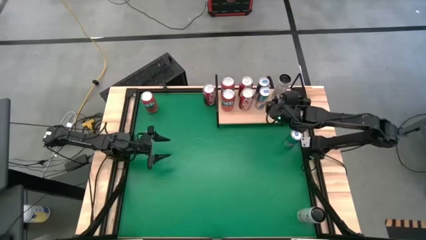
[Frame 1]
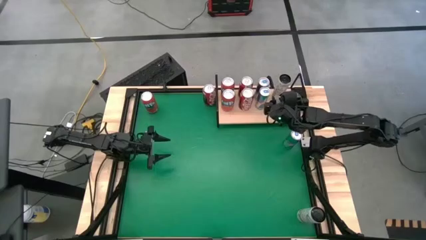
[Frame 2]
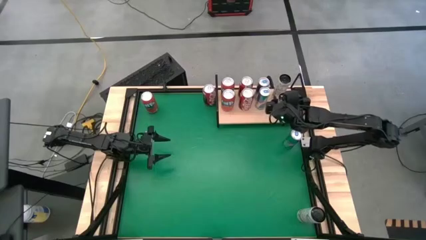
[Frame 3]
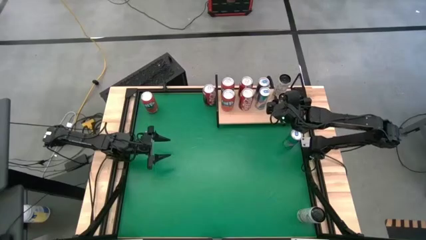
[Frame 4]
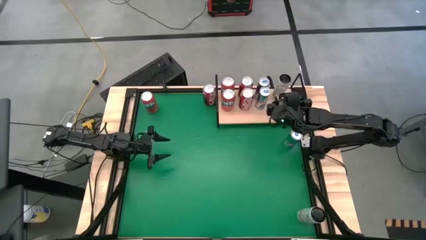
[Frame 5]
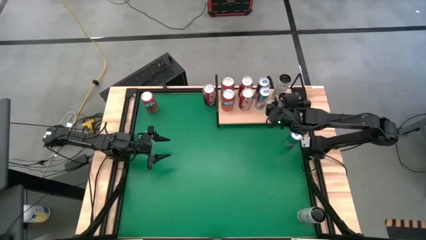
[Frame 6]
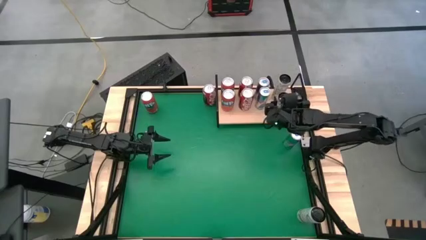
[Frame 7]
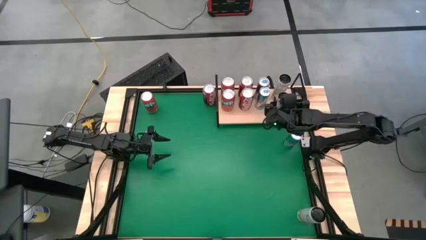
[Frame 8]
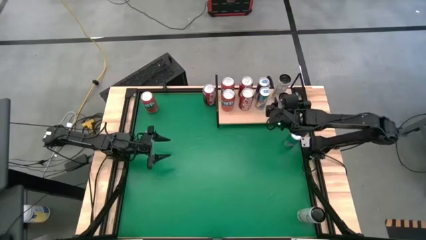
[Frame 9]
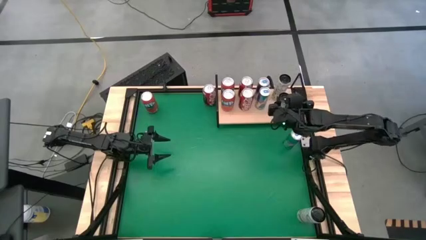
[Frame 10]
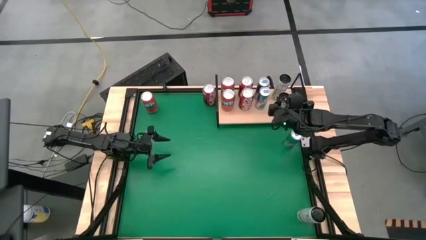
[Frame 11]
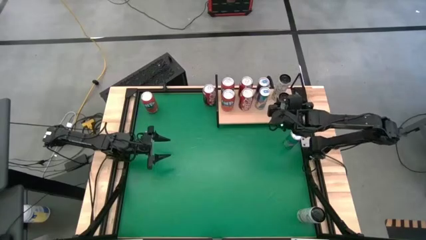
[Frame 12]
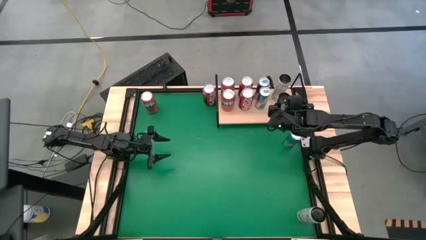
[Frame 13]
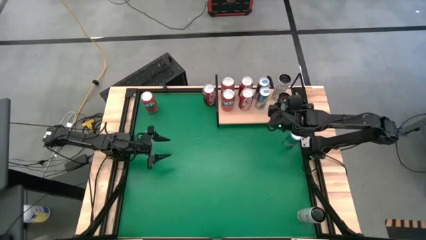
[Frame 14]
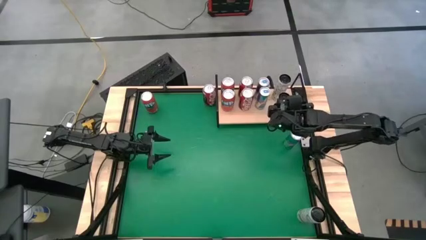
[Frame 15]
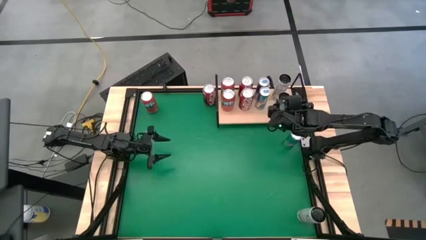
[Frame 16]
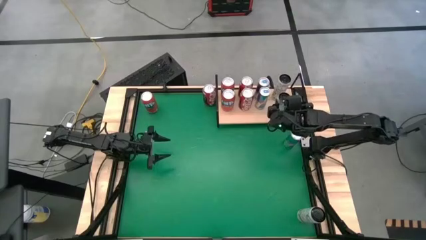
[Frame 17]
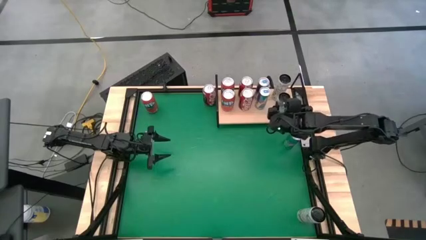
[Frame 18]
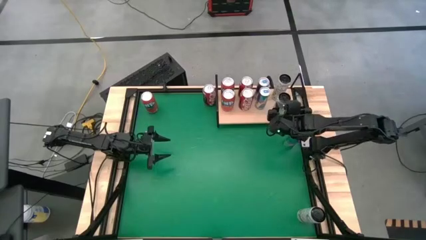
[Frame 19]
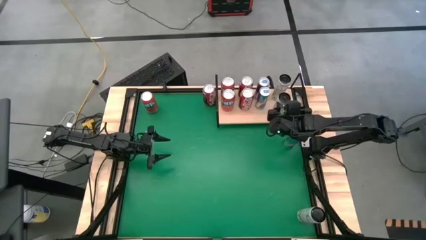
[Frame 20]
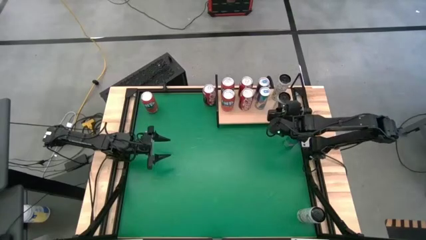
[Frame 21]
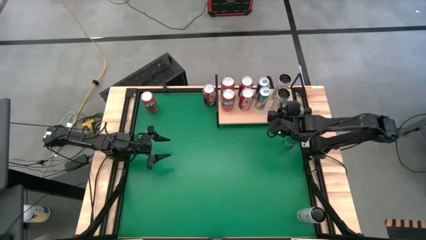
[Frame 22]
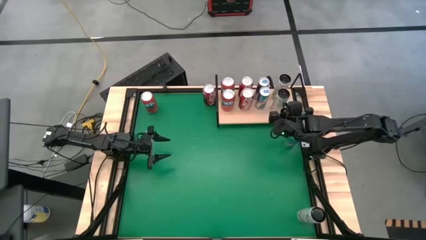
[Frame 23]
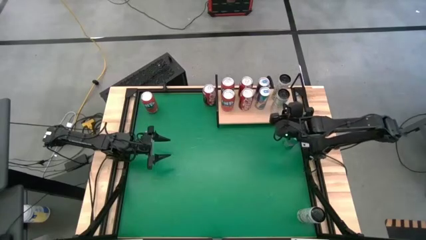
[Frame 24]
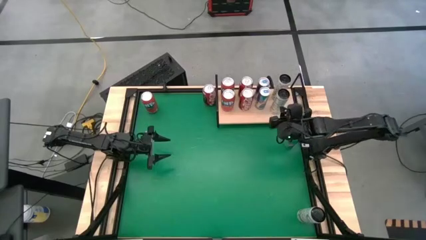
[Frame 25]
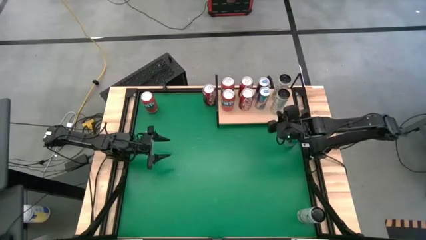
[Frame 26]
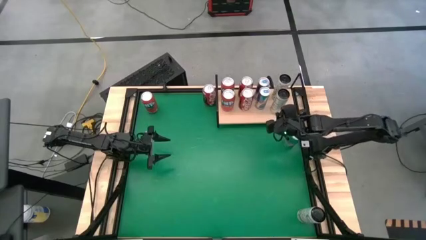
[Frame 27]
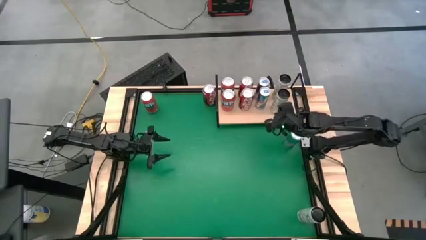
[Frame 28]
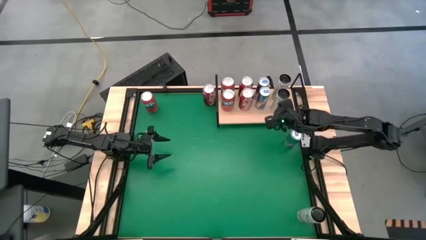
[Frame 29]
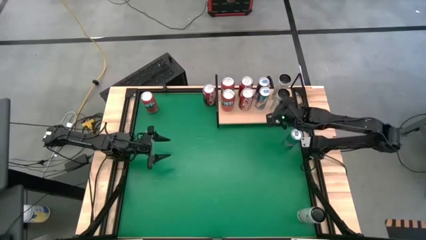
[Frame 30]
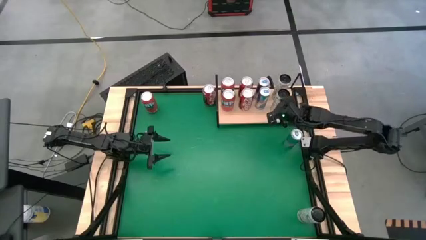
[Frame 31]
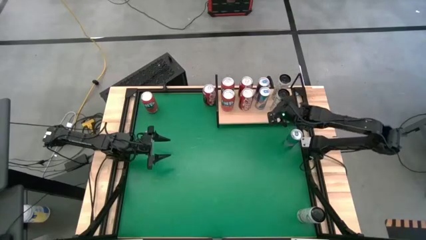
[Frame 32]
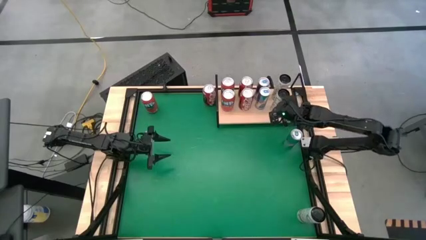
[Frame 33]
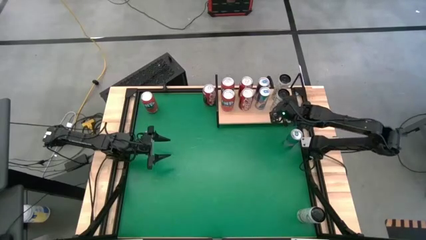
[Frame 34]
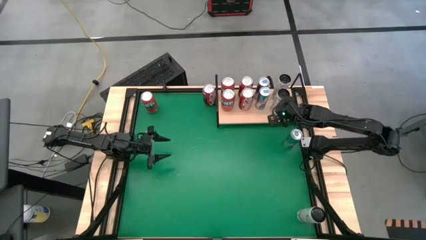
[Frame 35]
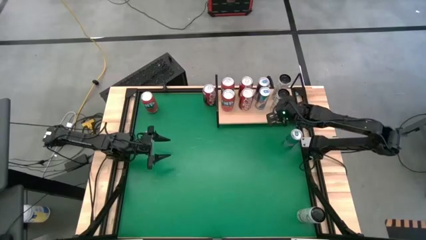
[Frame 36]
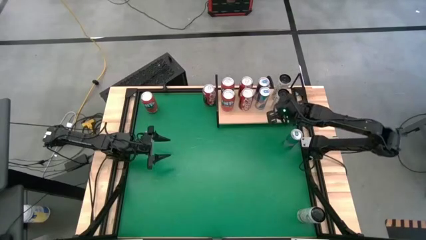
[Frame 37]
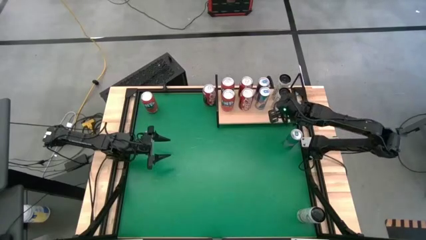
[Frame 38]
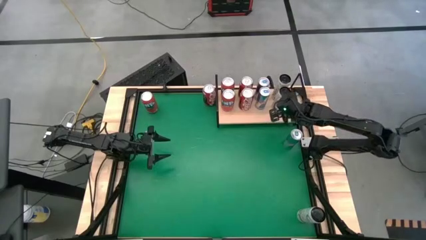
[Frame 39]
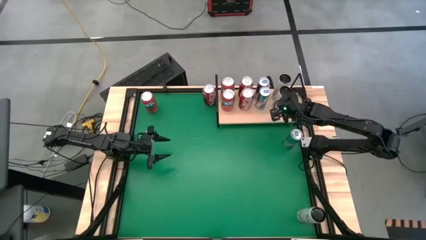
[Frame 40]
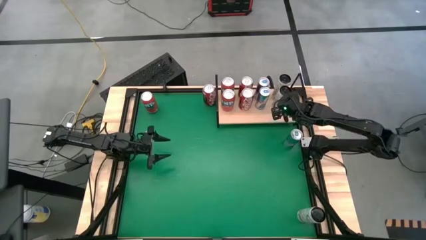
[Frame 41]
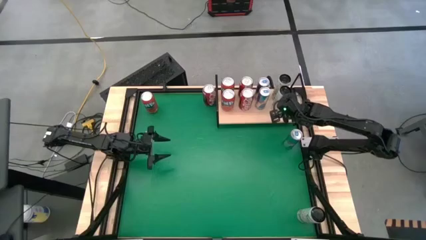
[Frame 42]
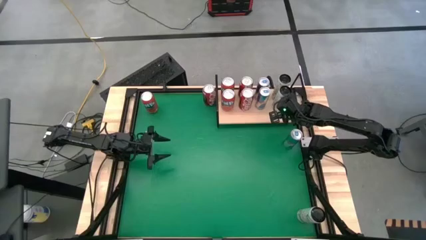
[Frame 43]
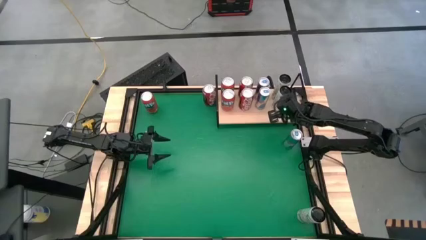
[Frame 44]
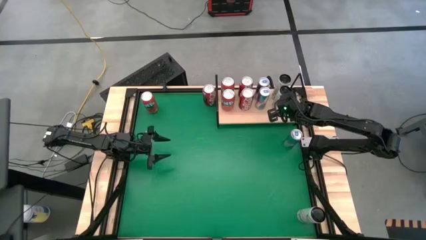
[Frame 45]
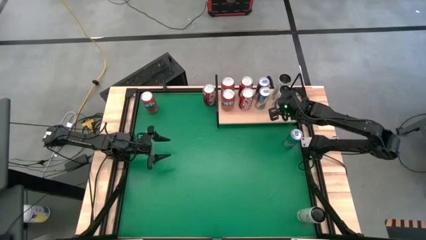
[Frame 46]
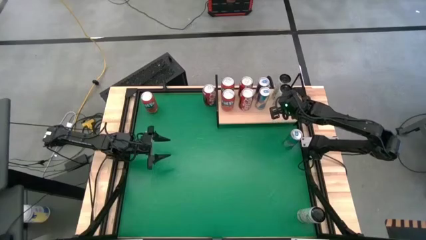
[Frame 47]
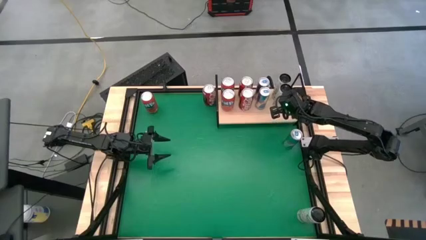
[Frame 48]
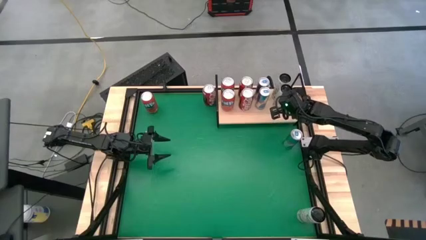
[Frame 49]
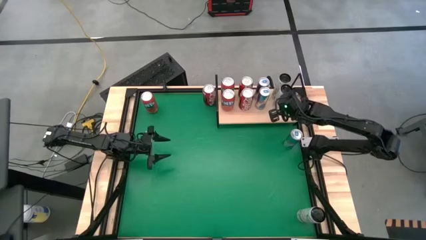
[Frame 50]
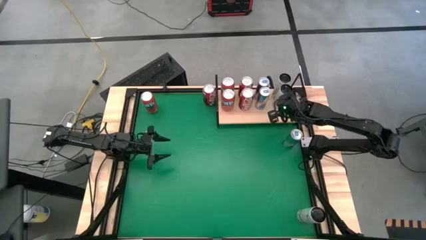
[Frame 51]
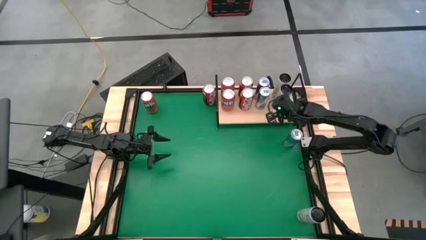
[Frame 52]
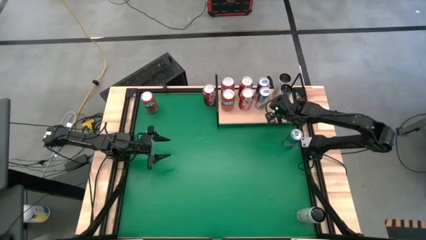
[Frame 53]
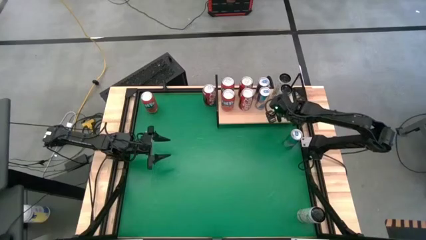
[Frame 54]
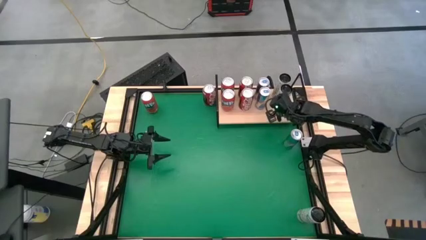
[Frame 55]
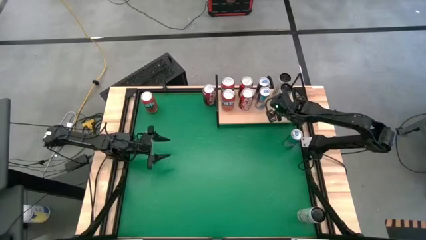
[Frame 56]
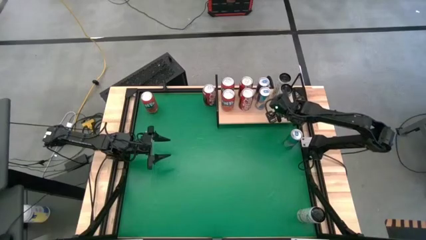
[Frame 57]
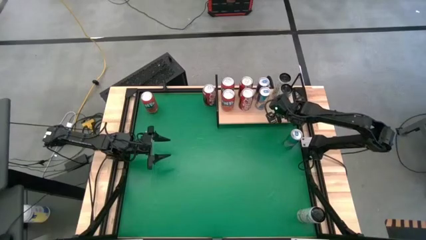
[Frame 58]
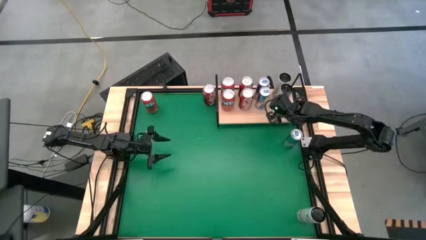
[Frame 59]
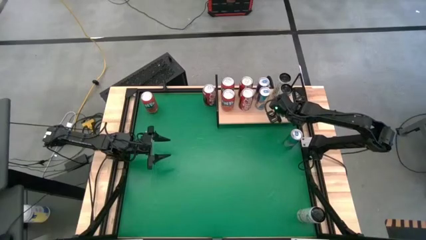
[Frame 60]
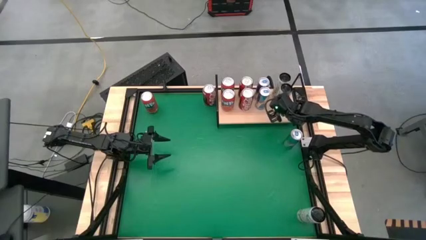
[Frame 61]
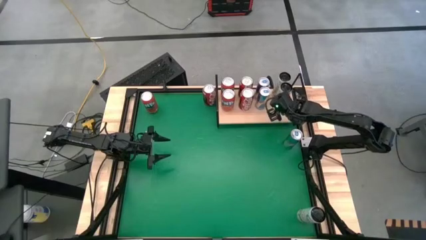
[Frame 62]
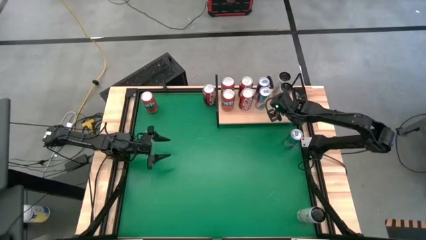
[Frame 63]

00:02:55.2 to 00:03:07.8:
Task: Place canned beverage on shelf
Put the left yellow soda can on the shelf aligned with the other yellow soda can
